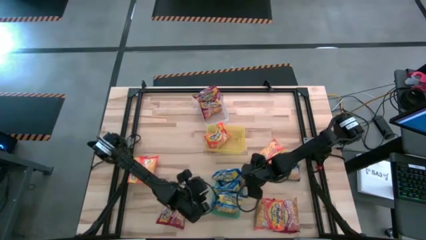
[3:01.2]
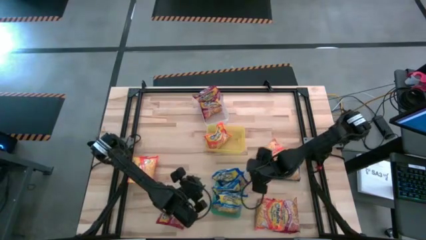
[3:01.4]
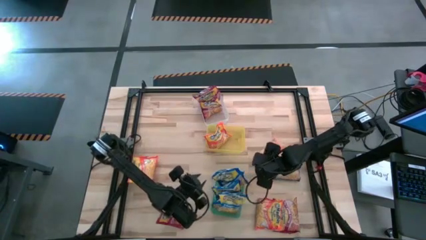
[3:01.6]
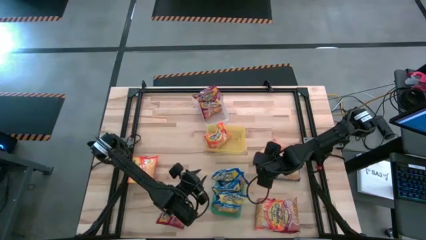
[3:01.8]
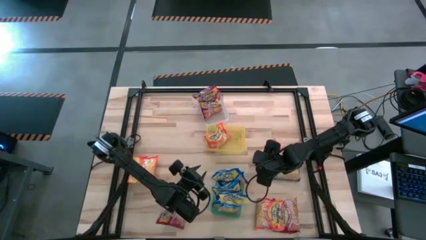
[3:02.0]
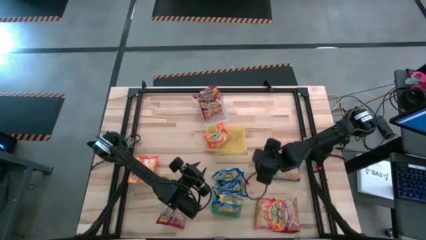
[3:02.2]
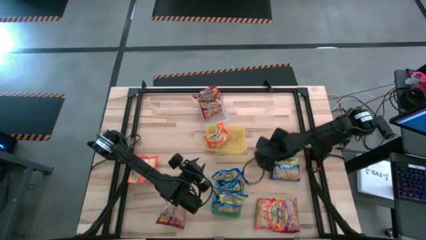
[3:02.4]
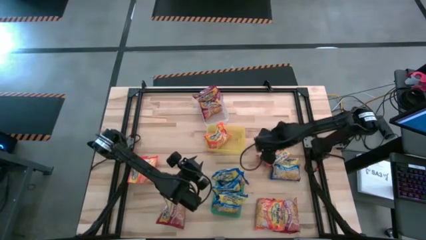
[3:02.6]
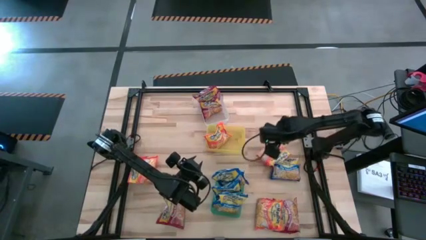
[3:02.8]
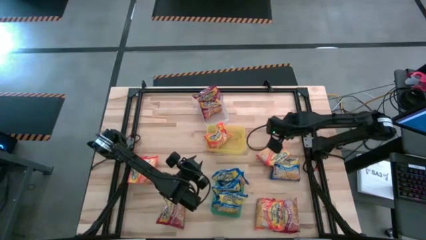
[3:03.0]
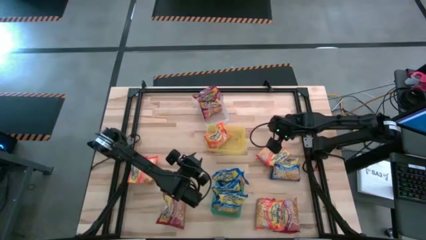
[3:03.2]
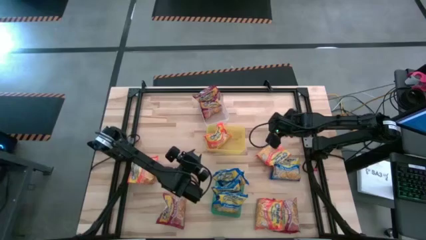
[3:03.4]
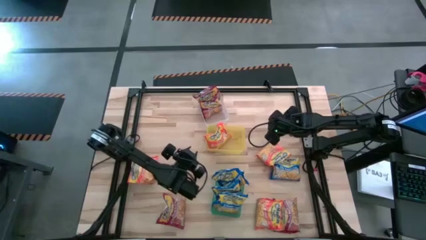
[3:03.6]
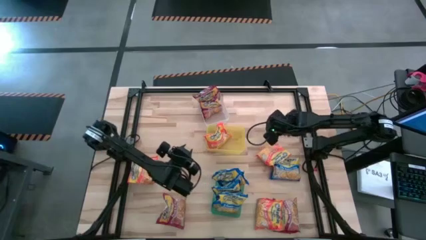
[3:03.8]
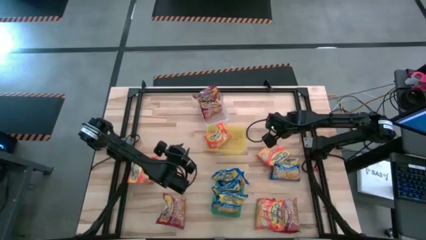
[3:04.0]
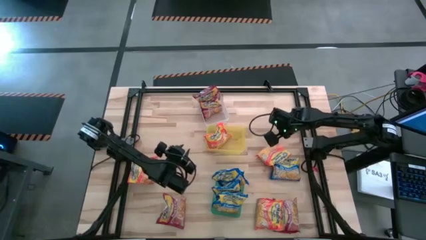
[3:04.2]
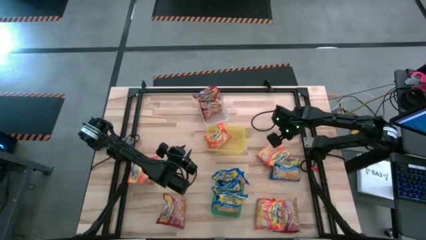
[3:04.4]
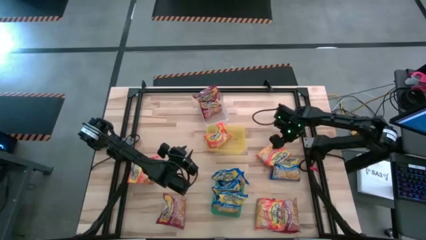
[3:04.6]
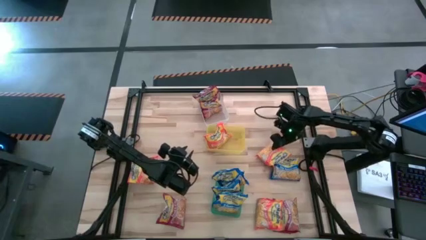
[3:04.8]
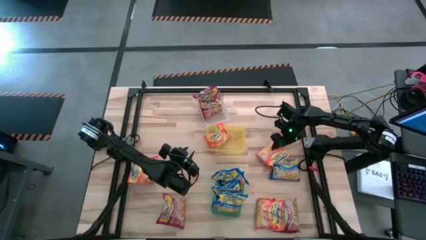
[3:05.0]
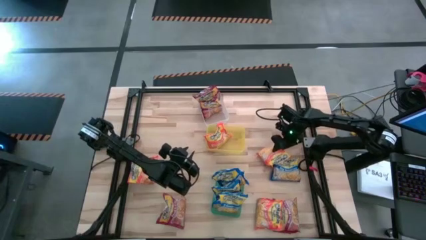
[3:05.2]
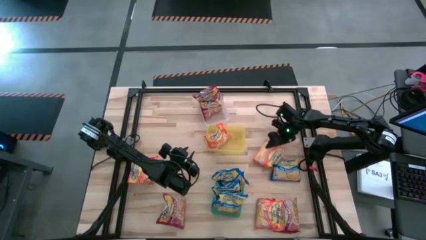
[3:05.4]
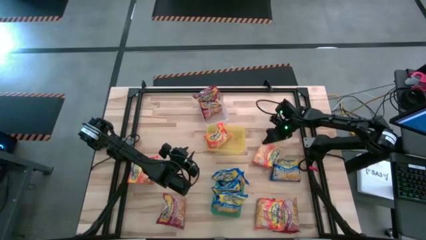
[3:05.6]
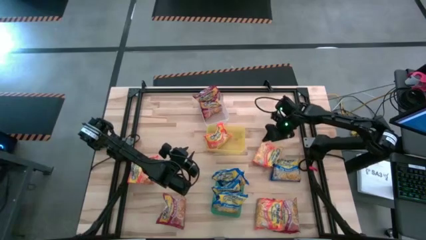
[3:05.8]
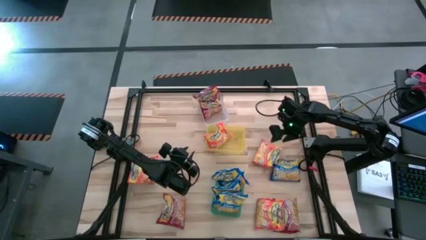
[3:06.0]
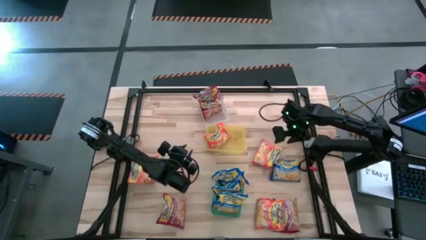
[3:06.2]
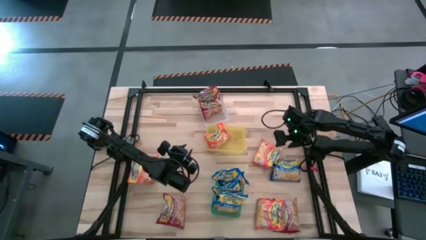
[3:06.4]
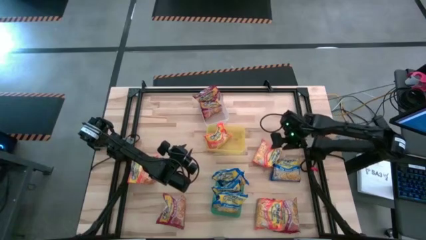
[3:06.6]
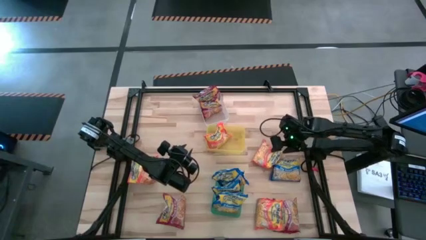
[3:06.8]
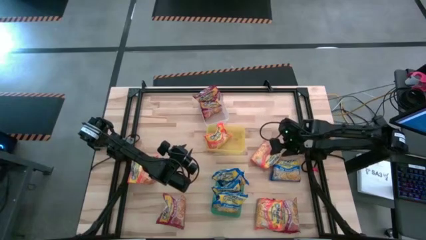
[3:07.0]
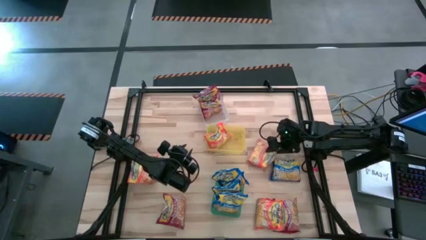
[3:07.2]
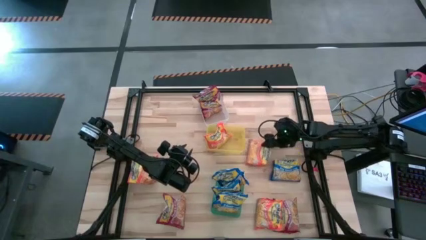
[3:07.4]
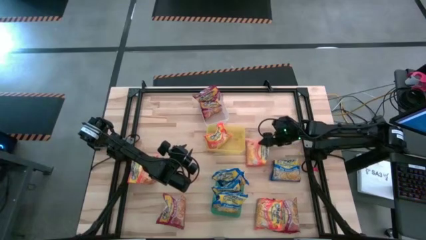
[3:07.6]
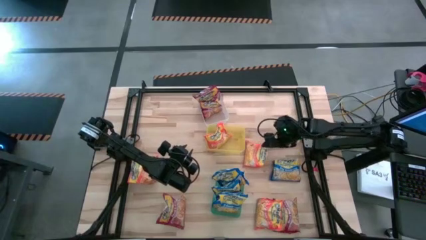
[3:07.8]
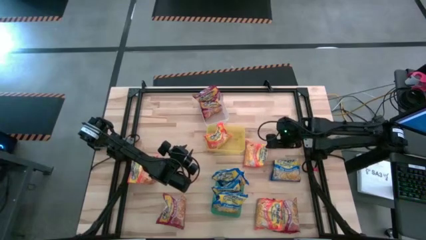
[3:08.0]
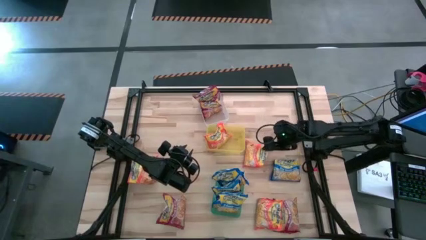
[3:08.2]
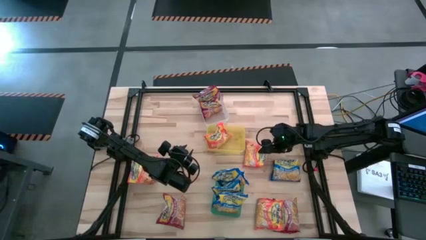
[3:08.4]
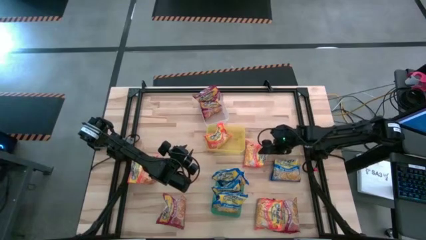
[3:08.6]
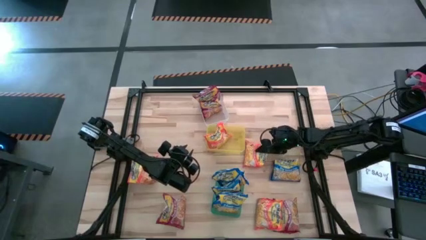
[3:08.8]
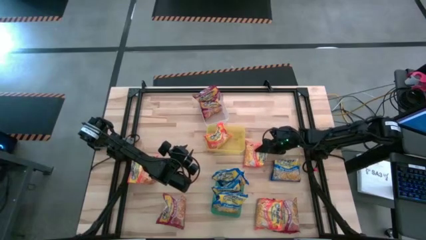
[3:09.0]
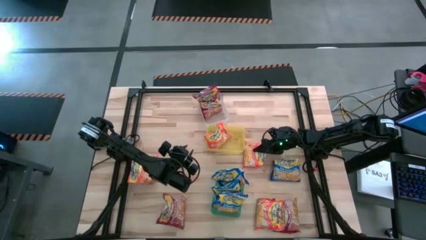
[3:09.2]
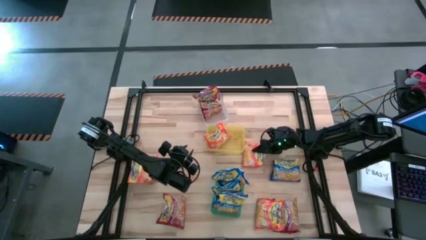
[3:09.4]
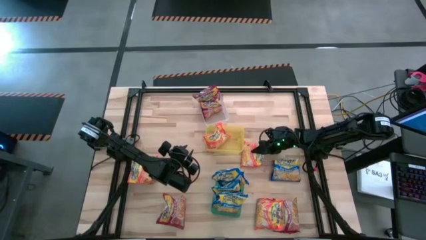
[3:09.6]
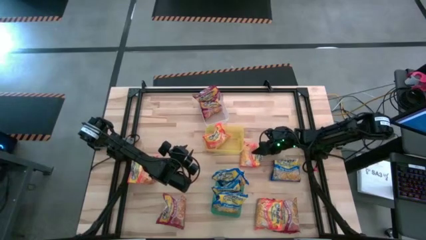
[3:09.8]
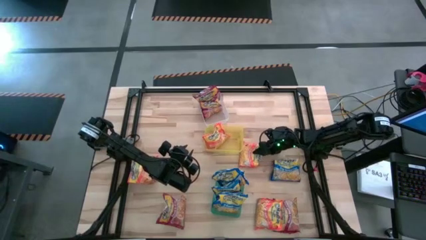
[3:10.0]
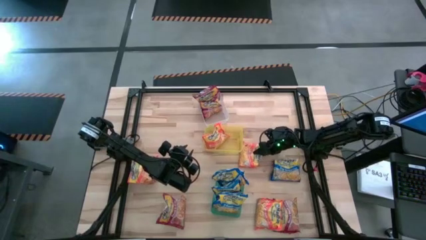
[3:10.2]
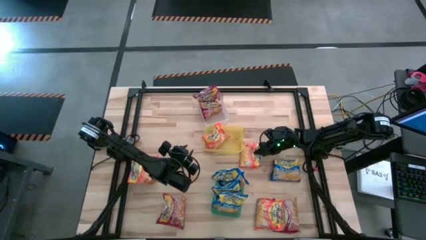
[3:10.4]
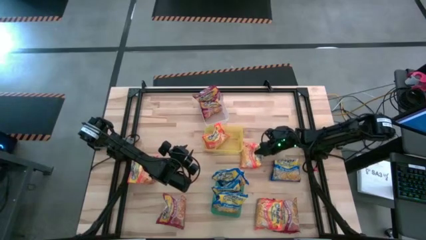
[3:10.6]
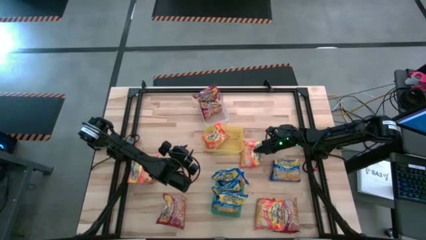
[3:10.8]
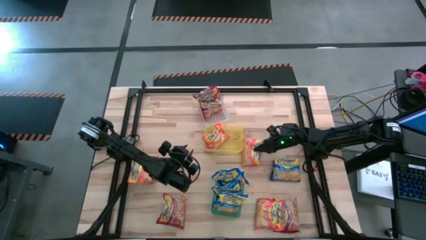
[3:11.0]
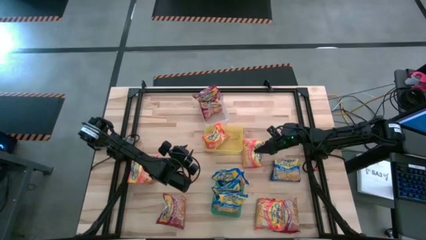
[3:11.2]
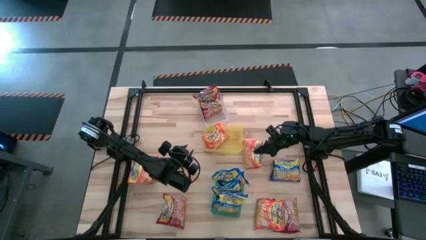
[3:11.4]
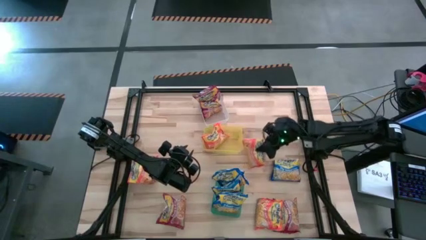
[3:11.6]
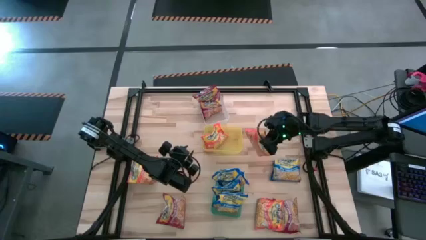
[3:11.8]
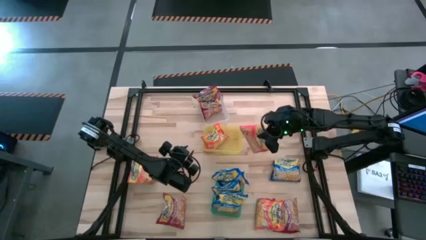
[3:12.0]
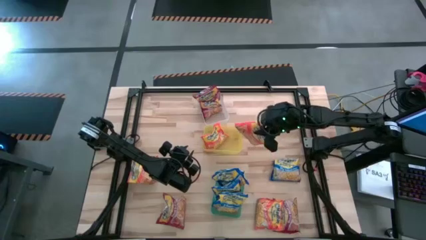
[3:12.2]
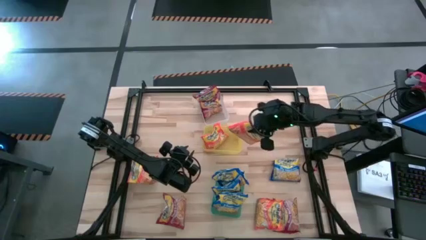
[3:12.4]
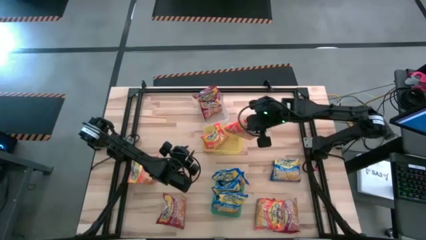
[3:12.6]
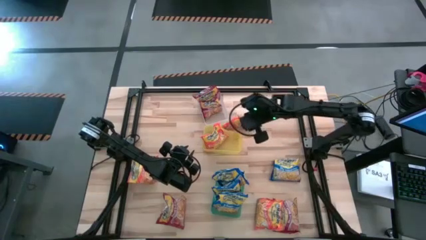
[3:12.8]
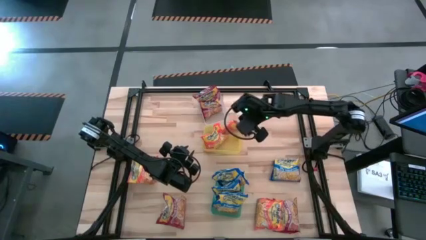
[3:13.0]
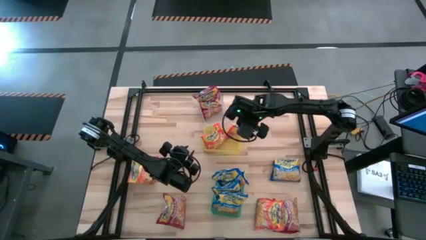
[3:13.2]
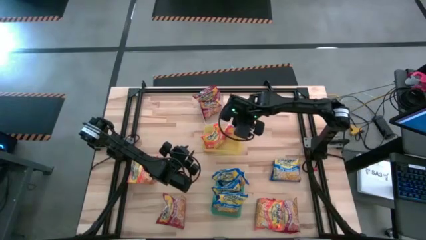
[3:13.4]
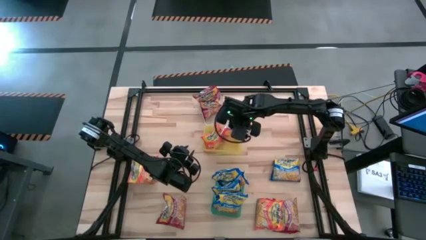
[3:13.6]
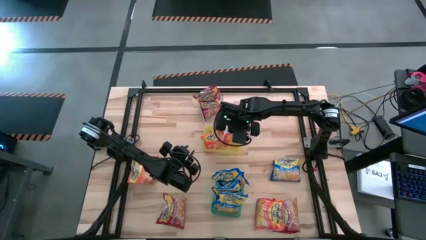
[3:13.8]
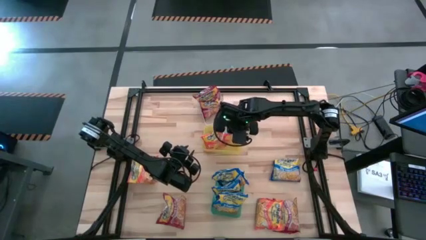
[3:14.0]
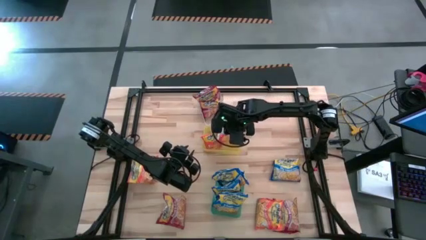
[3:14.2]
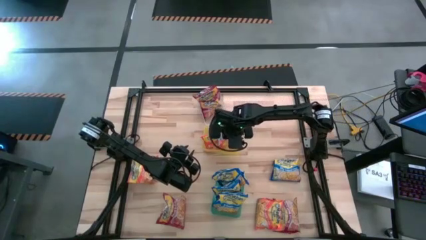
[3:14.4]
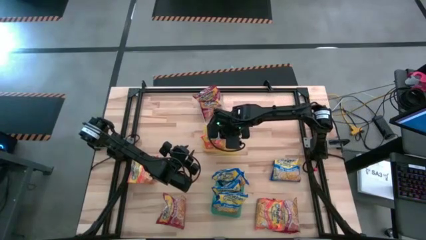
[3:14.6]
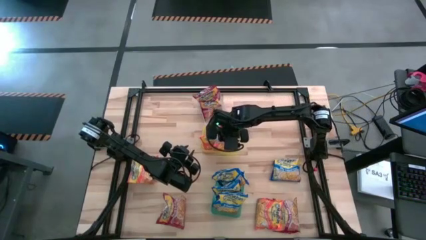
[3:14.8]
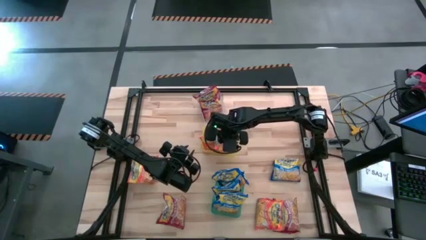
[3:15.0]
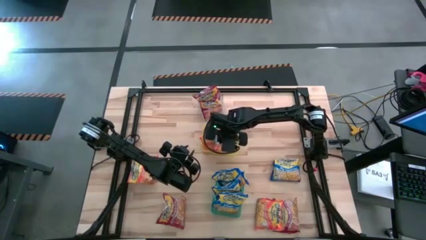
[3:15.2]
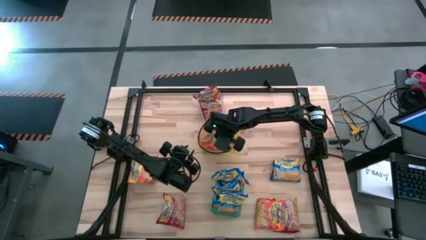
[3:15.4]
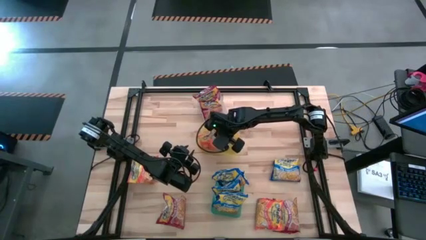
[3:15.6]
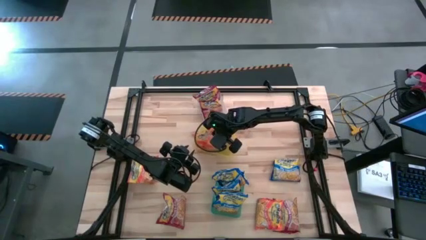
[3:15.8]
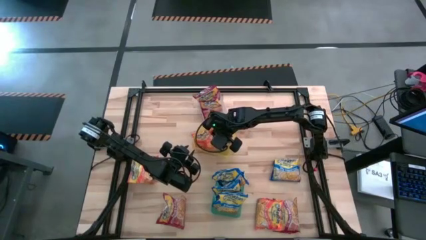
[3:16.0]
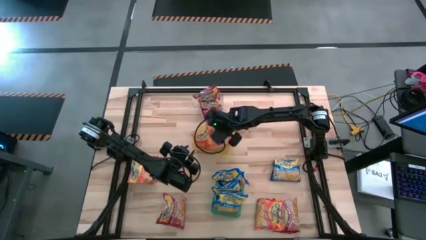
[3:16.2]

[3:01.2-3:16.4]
Task: Sort Maruchan noodles
Put the orange noodle pack into the yellow bin
